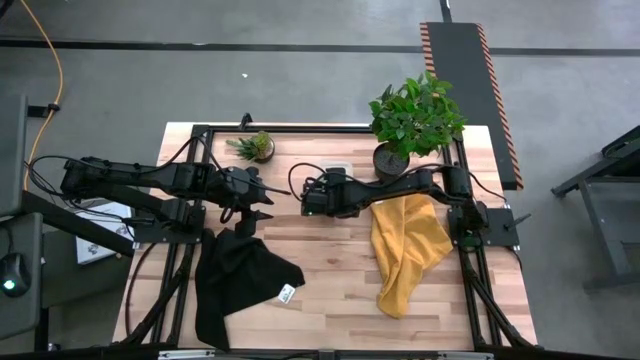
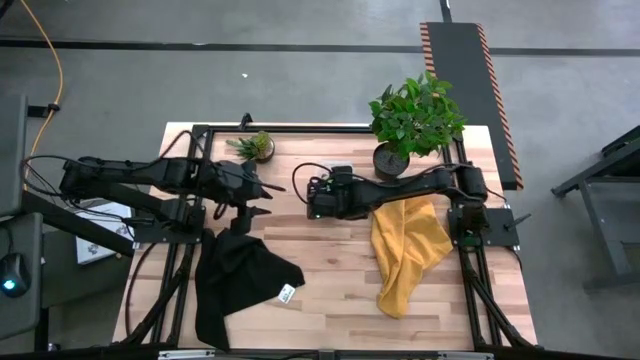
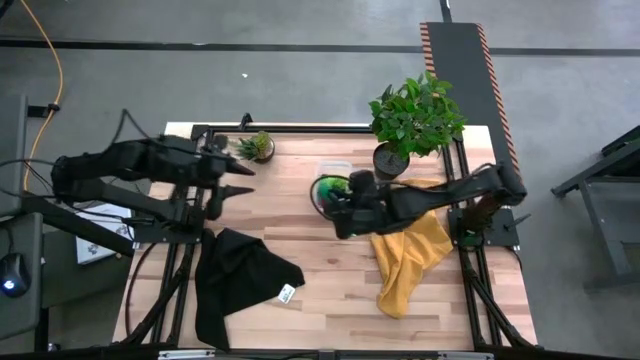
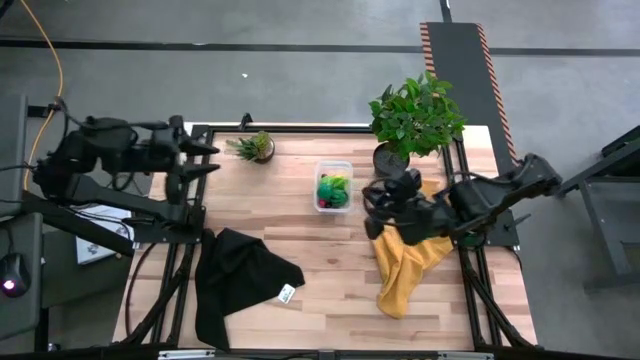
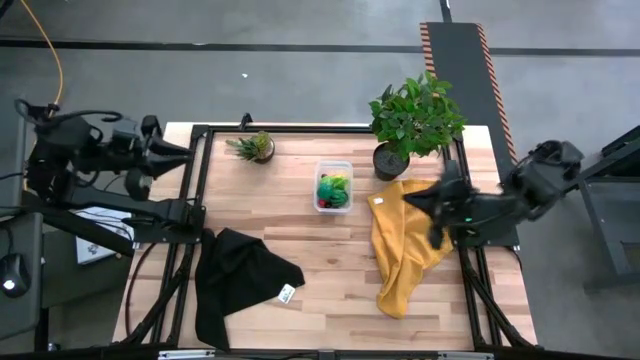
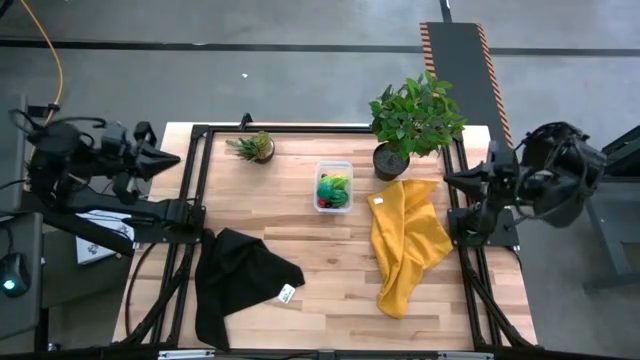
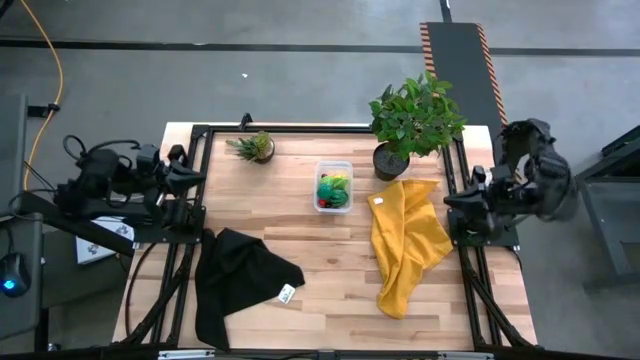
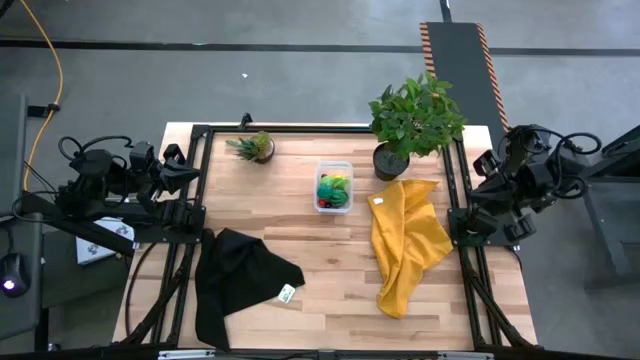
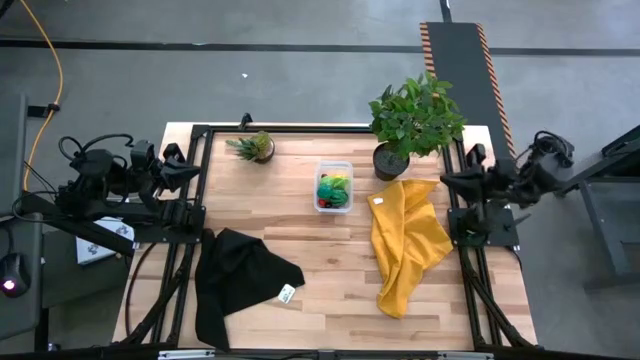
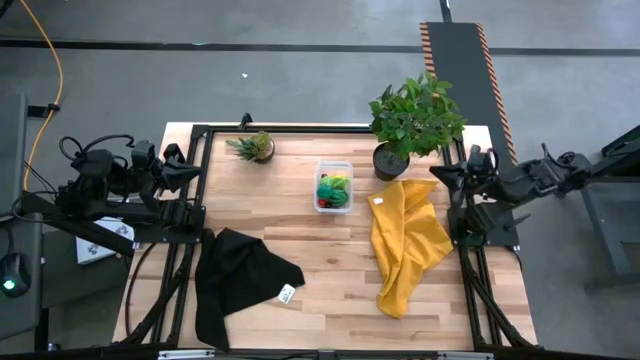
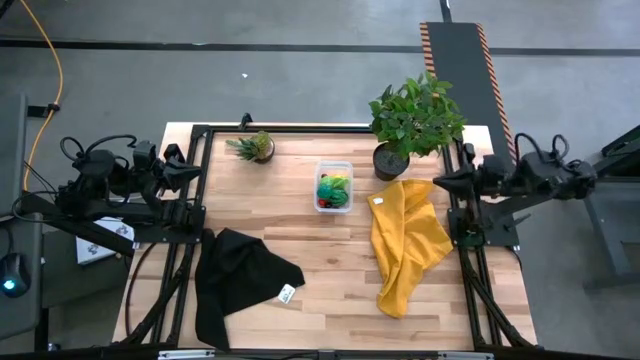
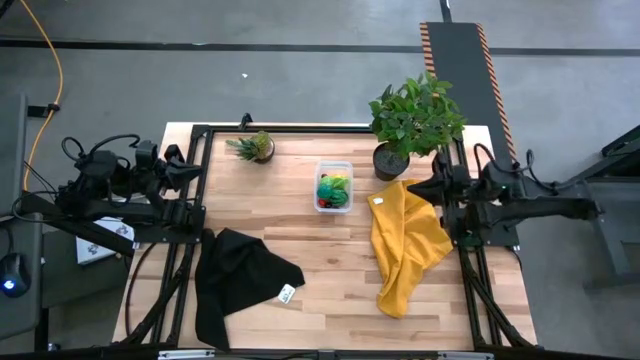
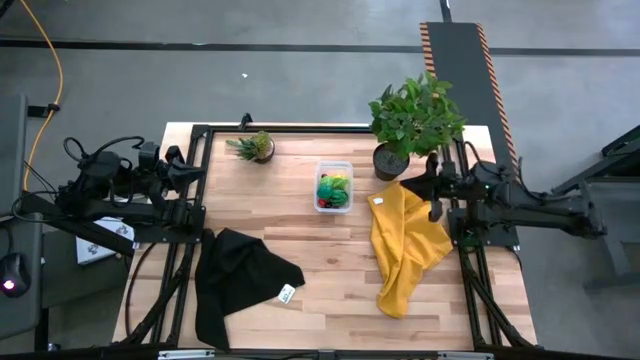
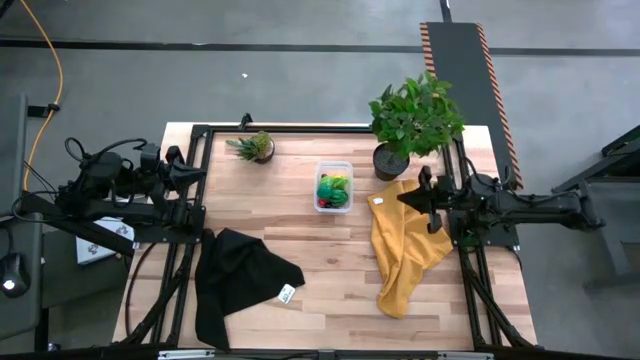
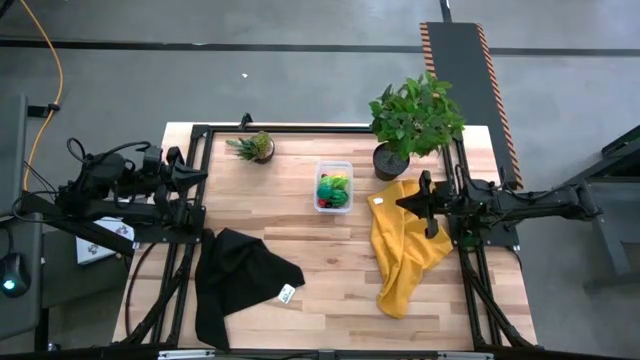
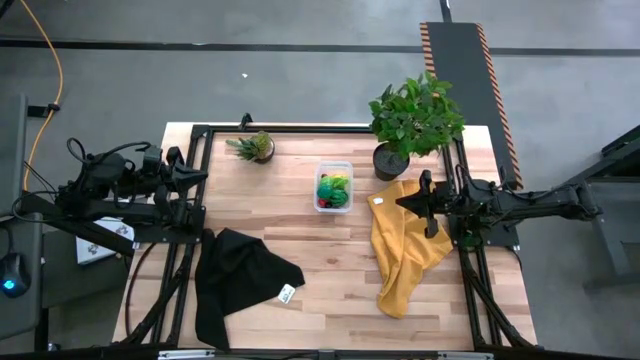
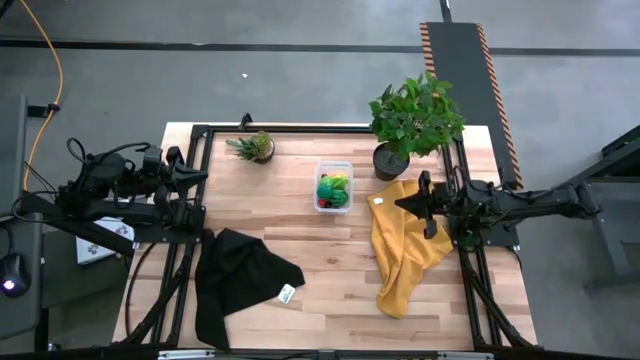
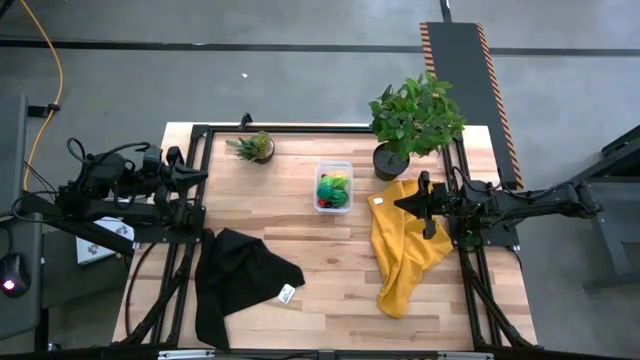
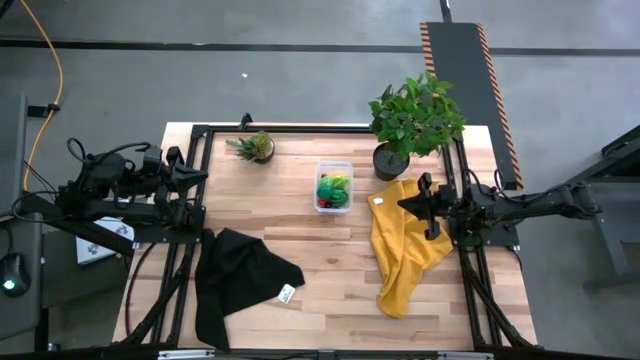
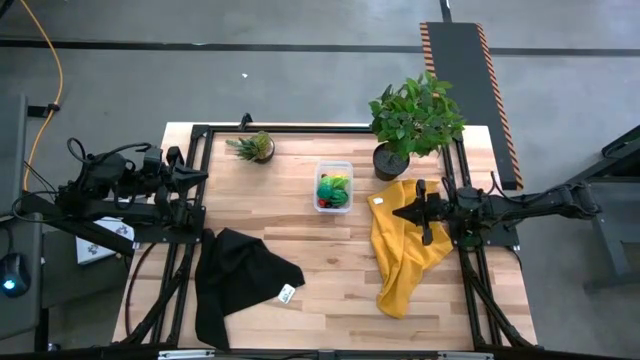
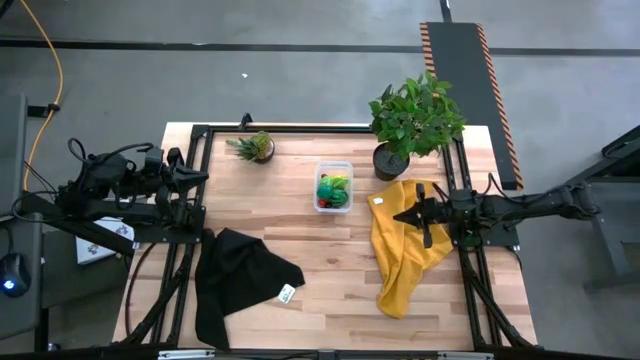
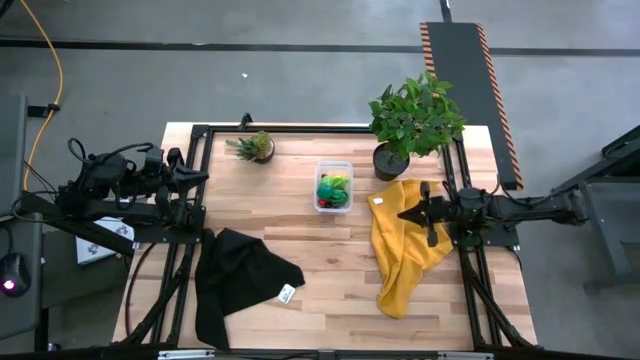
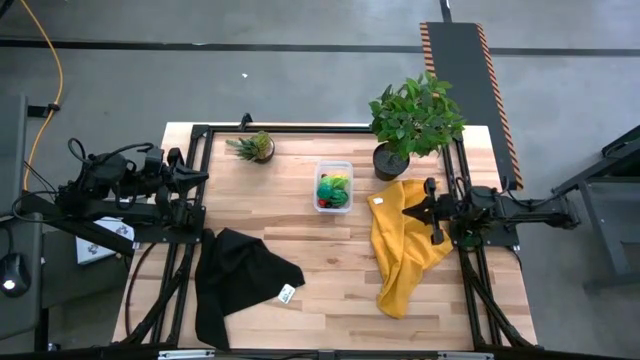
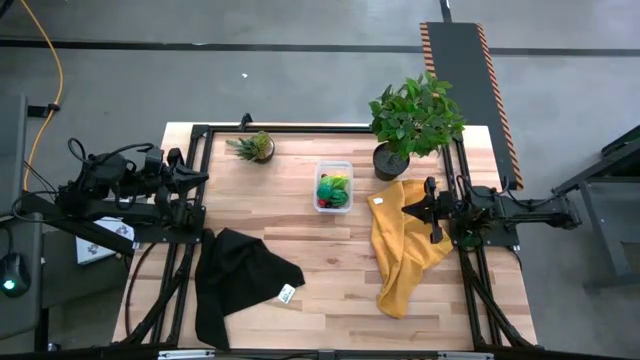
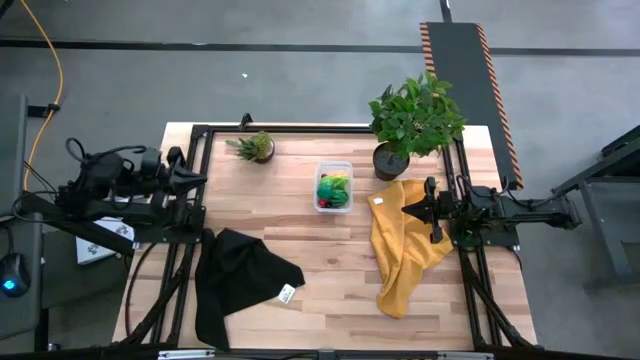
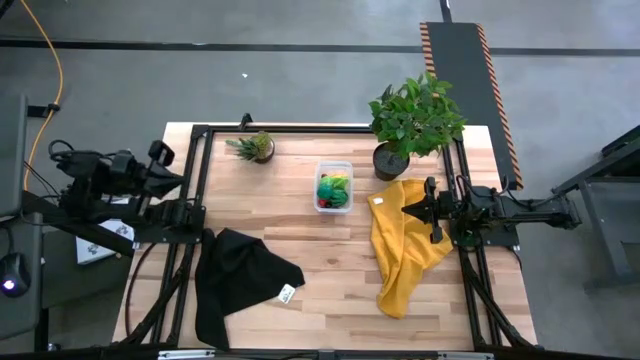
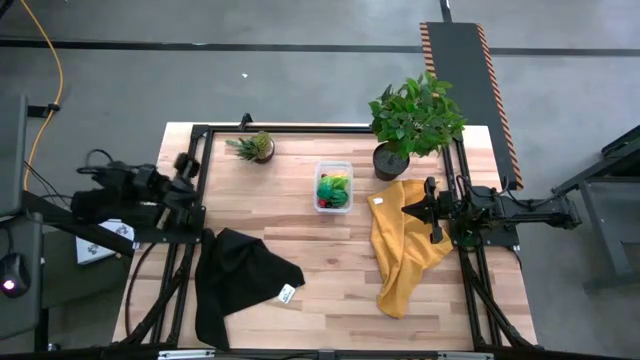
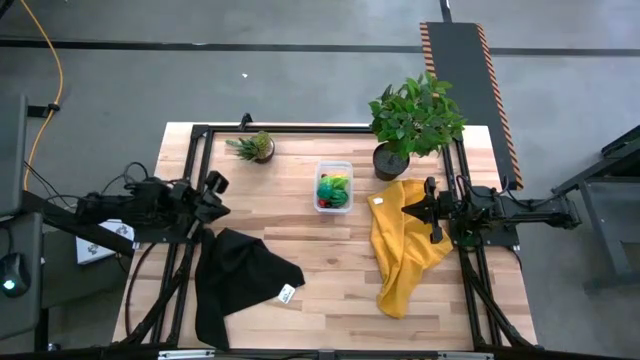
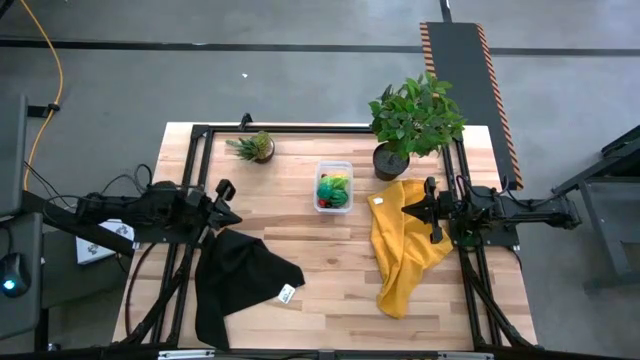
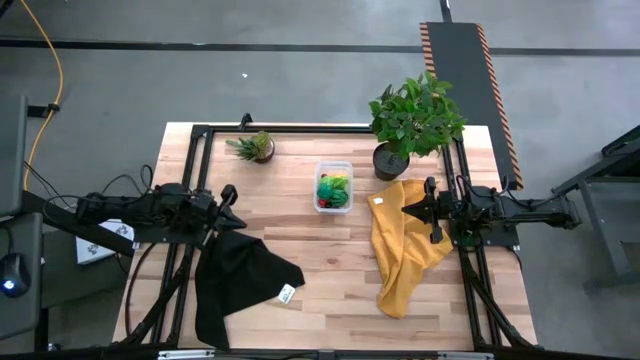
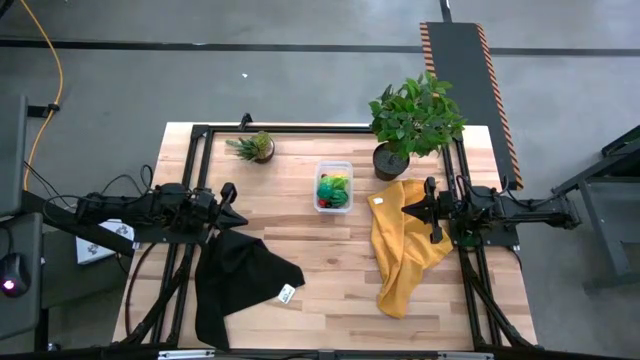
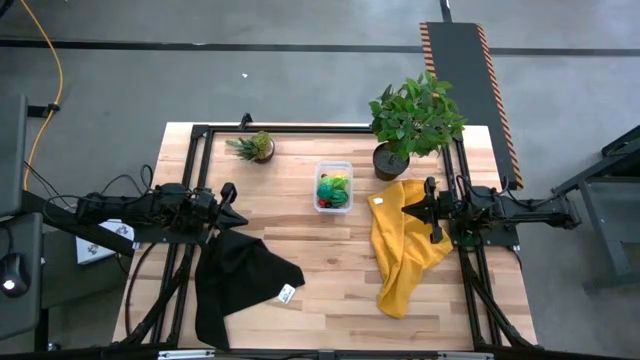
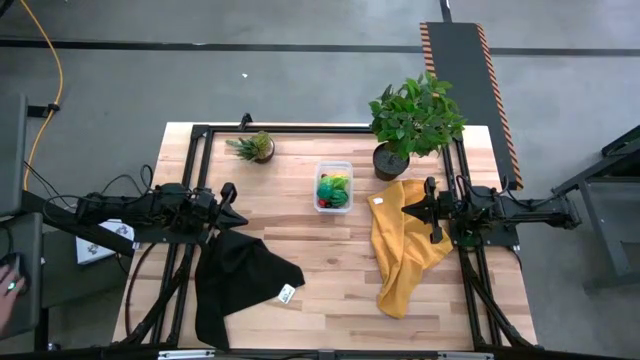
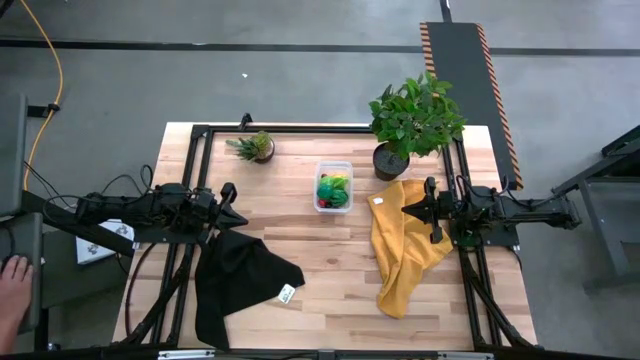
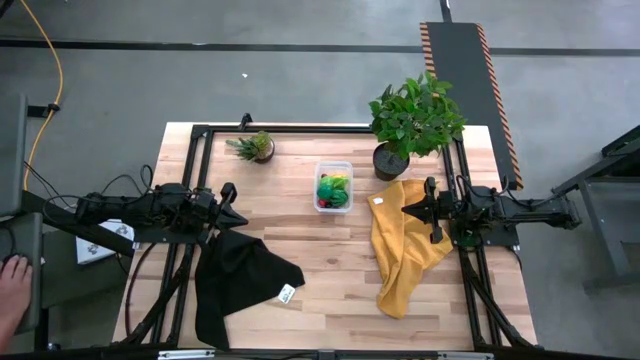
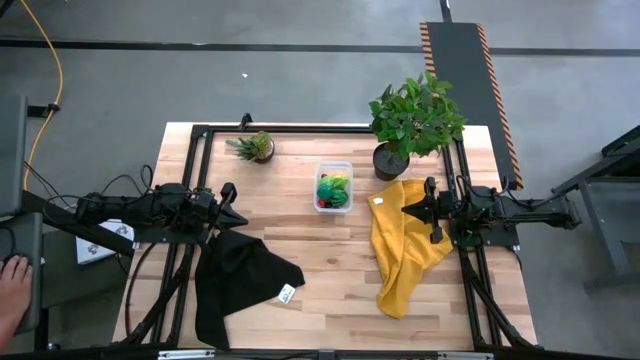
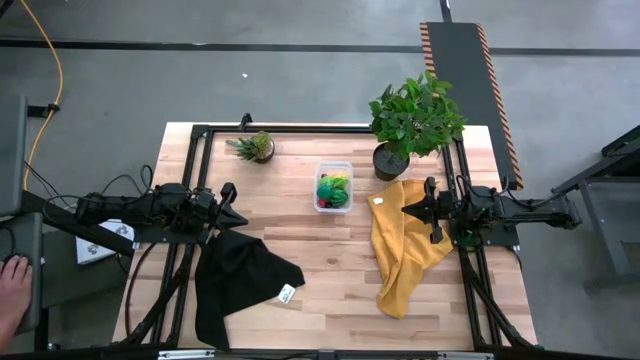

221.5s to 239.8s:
Task: Pick and placing Produce into tupperware
Return to Home Position

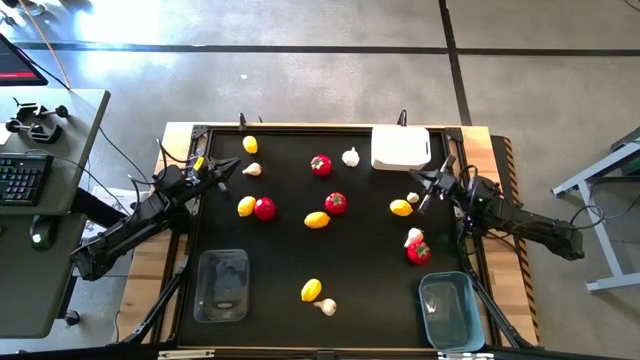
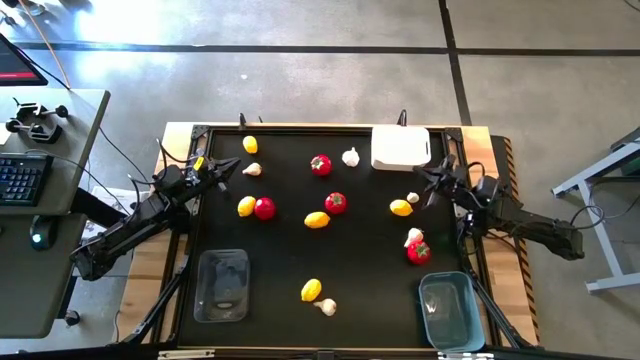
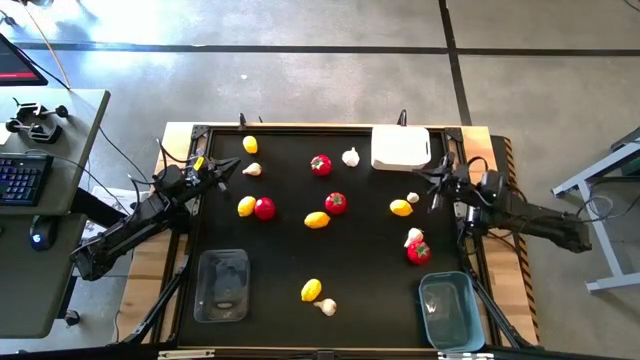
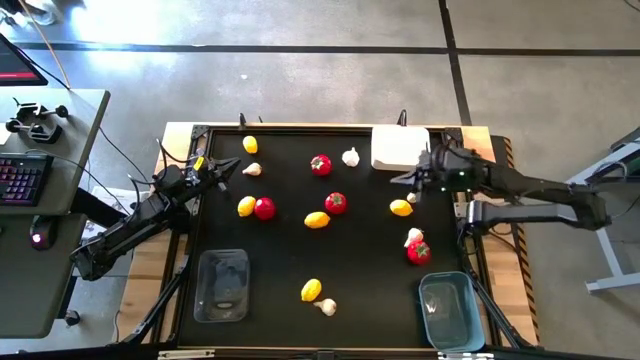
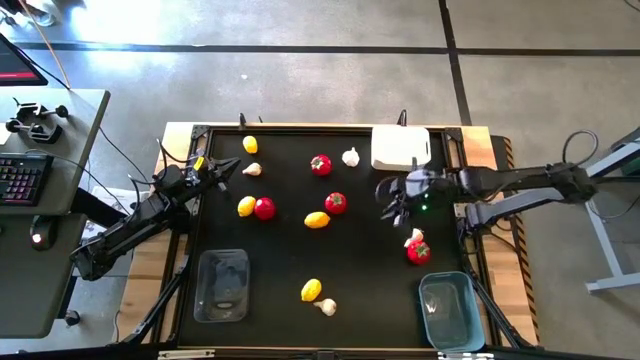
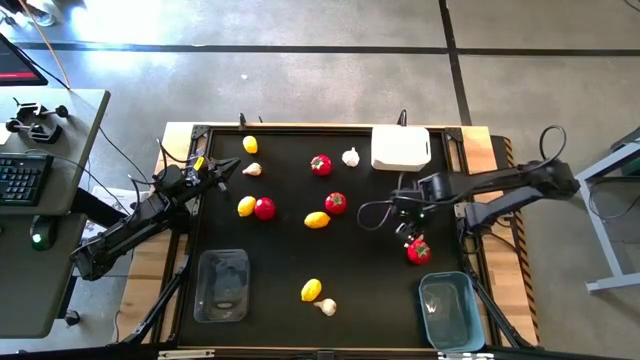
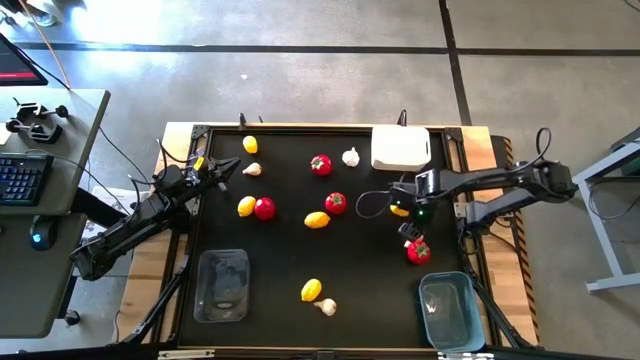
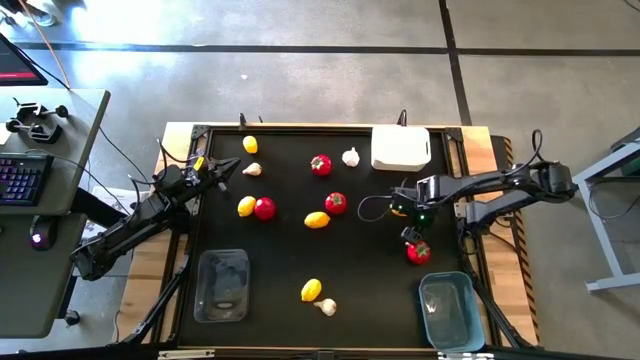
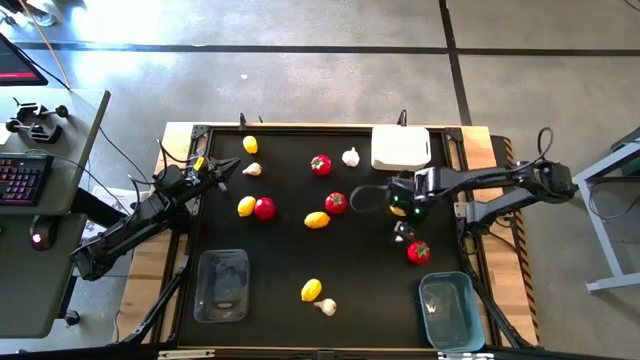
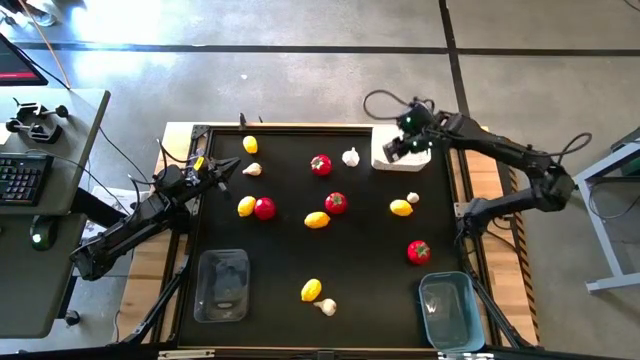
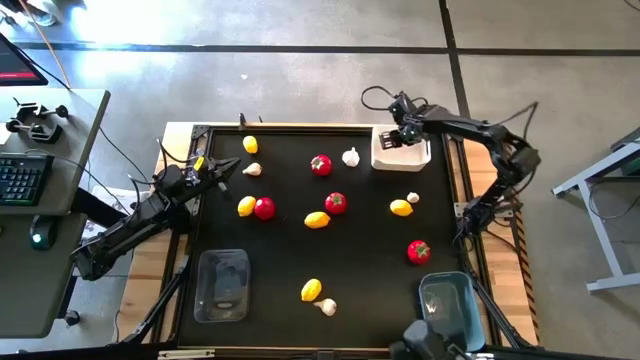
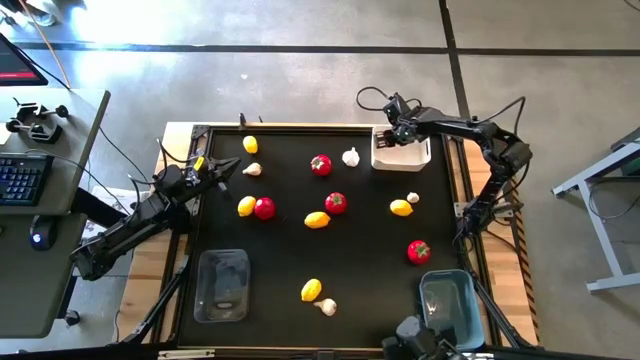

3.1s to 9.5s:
Task: Sort produce into baskets
Put the garlic into the white bin
